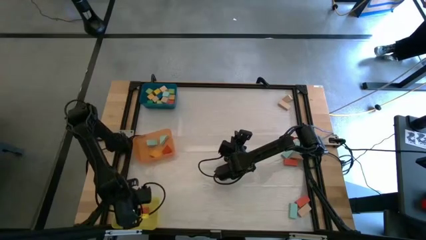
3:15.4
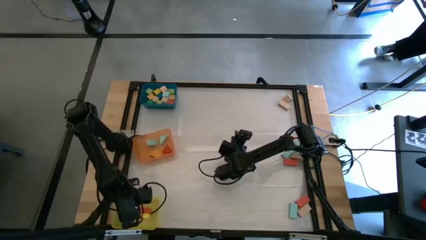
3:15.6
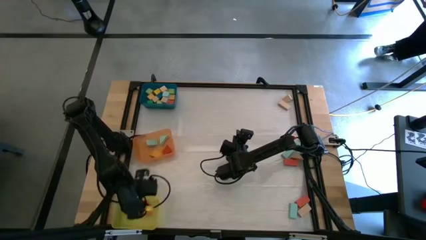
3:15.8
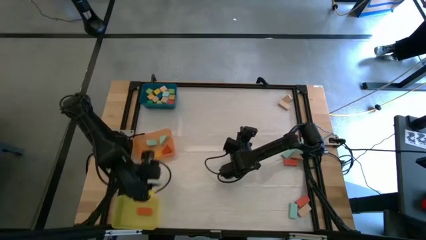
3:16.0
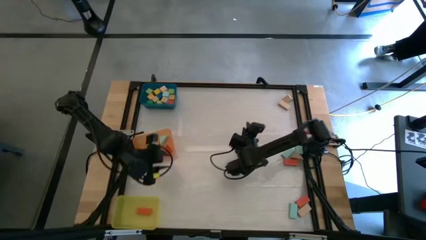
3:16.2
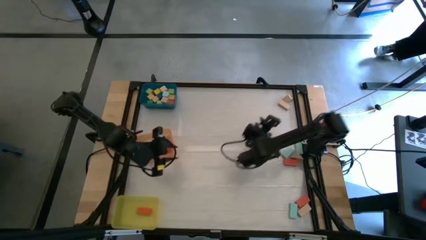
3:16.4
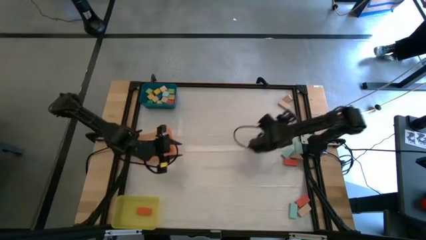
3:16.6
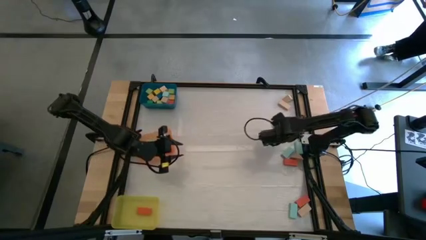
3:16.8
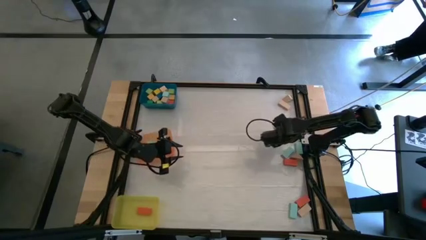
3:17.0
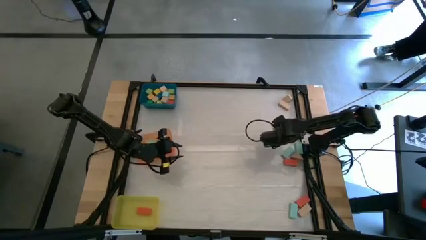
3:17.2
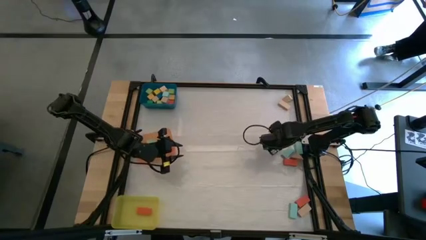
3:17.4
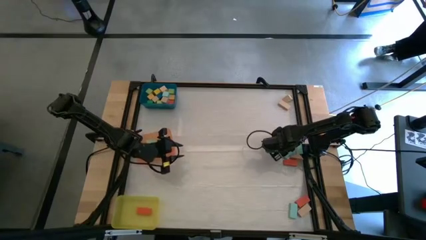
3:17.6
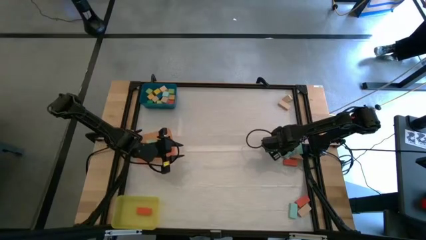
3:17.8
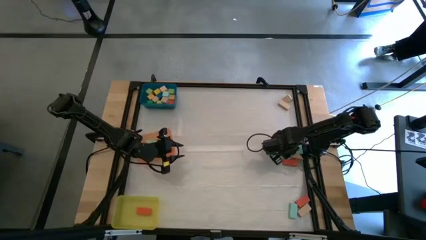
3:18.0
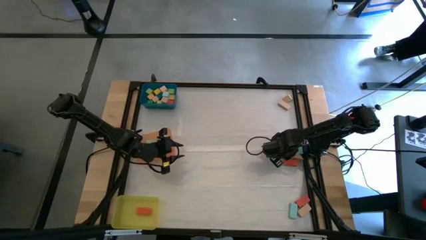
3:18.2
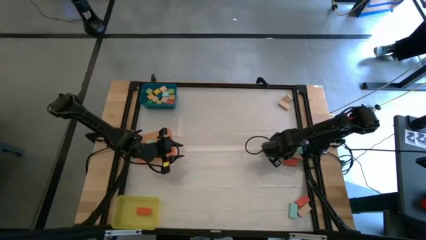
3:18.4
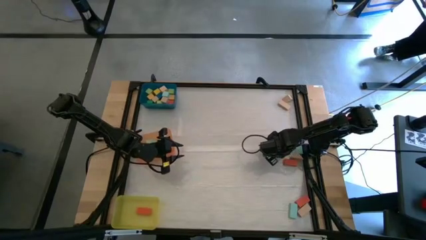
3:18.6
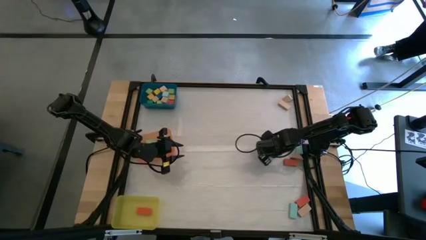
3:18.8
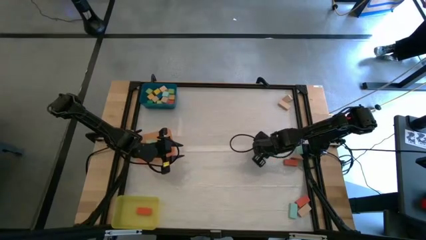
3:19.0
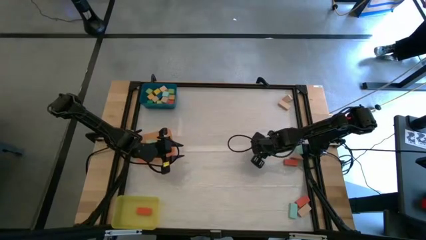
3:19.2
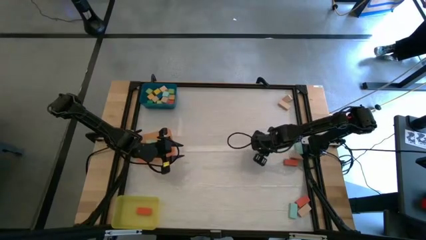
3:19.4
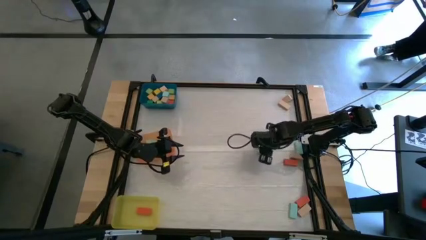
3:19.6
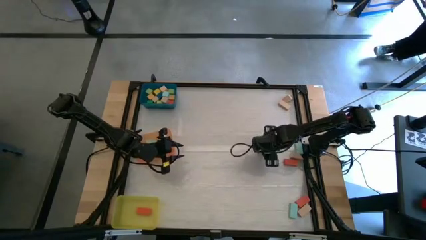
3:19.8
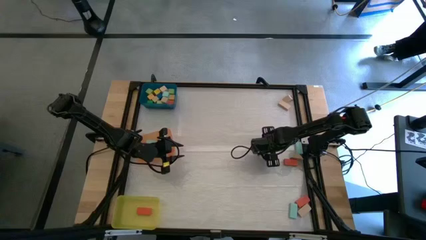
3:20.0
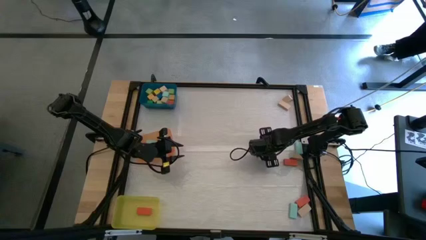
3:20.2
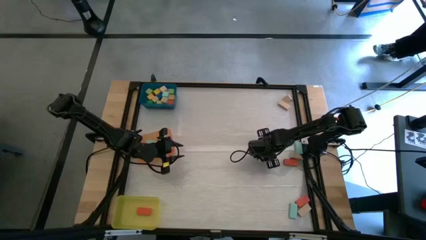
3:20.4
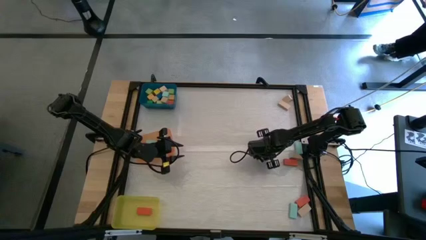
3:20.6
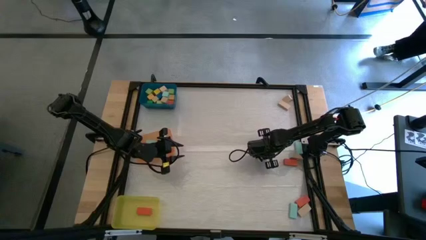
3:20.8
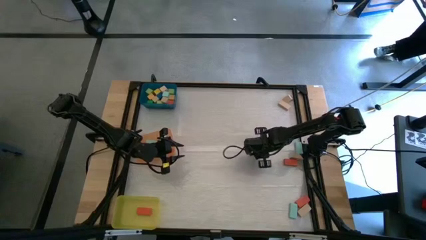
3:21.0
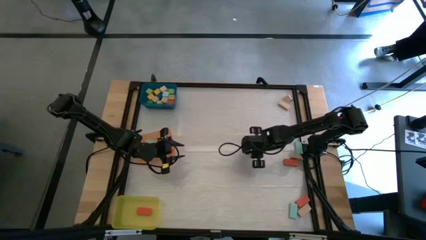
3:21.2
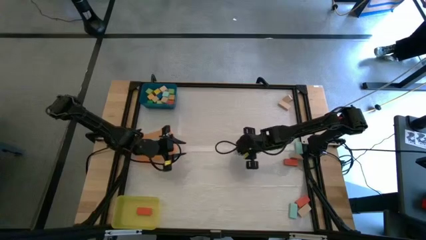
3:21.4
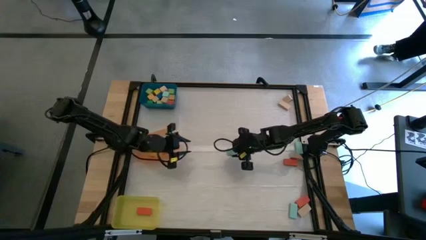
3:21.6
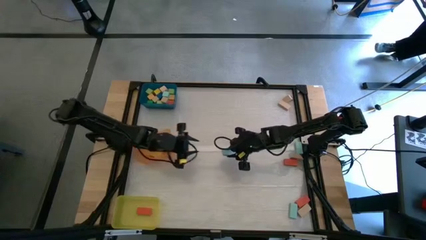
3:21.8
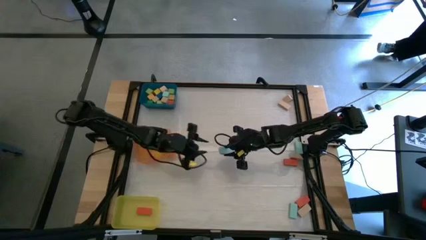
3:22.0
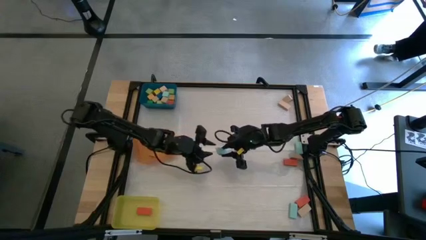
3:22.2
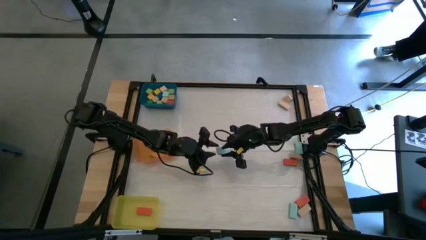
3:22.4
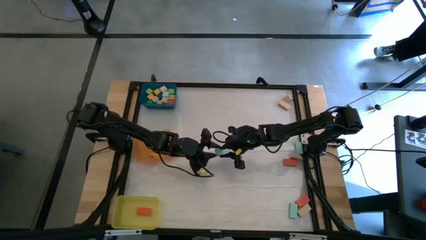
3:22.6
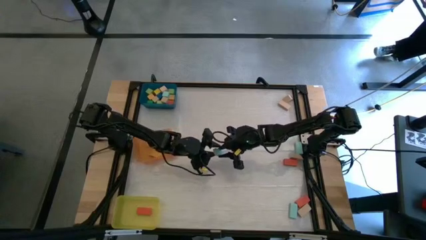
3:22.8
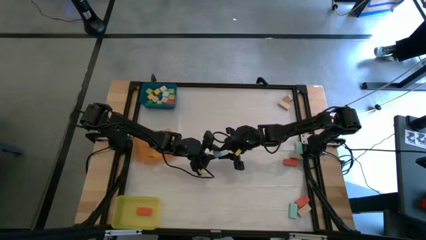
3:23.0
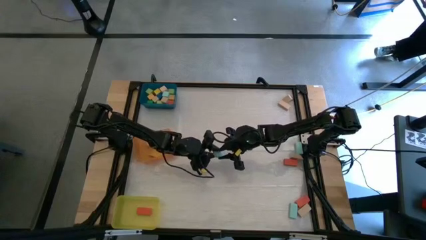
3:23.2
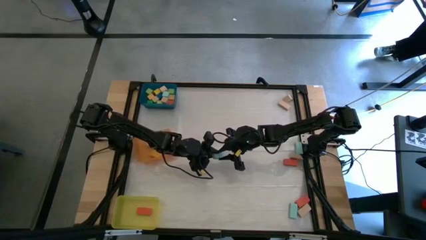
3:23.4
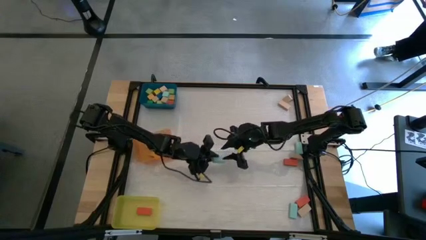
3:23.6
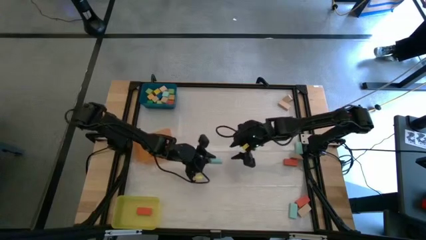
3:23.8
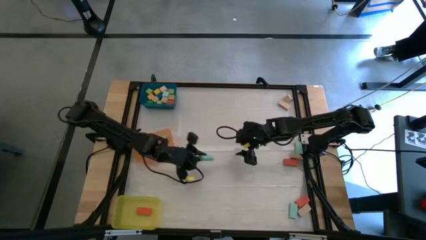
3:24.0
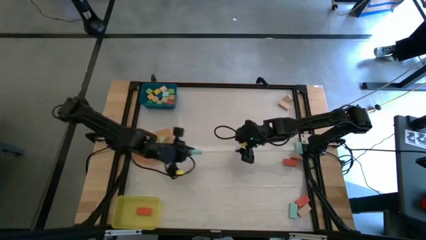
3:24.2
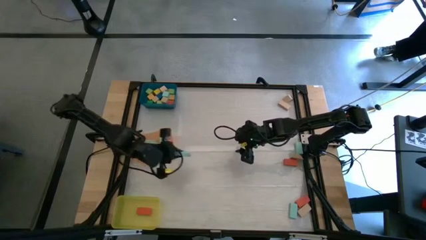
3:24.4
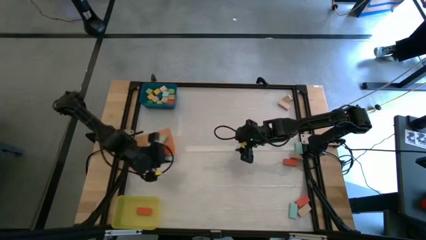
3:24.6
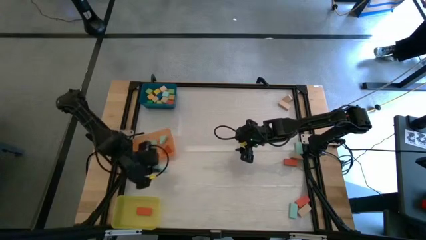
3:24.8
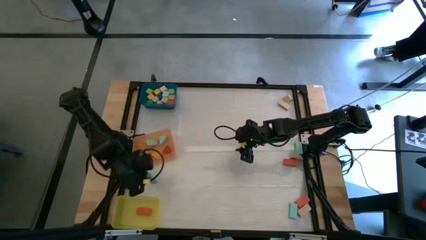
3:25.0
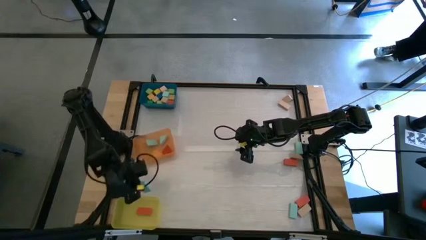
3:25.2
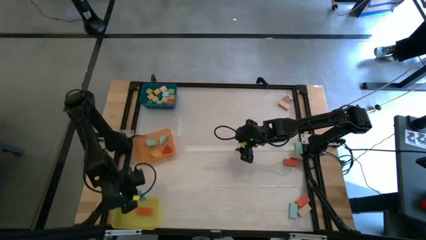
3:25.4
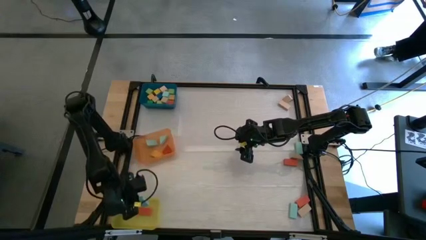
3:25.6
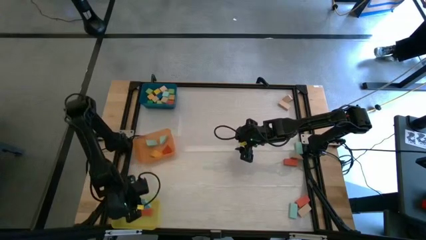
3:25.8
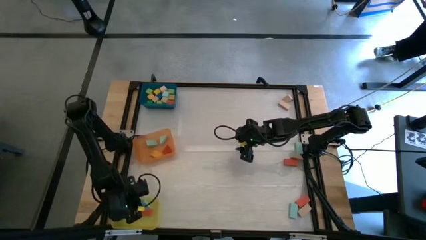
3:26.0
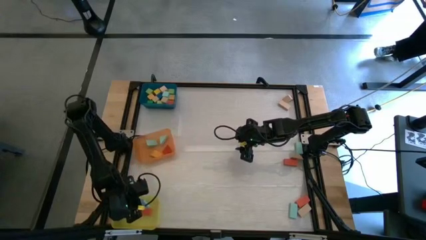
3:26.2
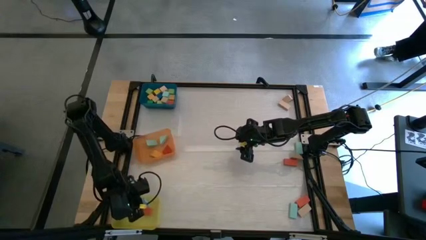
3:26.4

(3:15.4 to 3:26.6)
Task: Sort blocks by size
Put the light blue rectangular block into the yellow bin

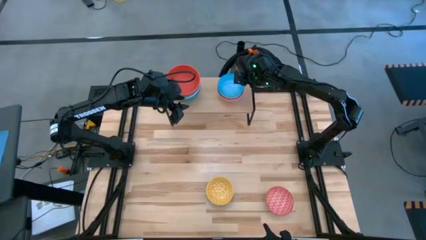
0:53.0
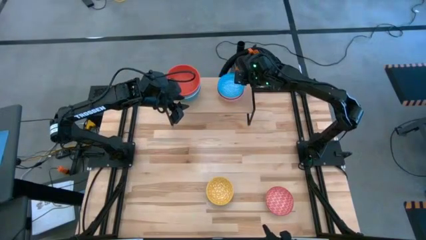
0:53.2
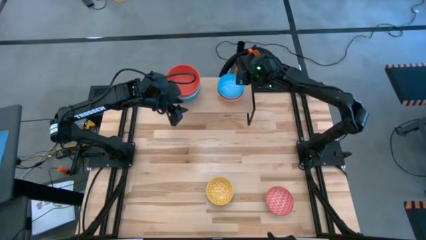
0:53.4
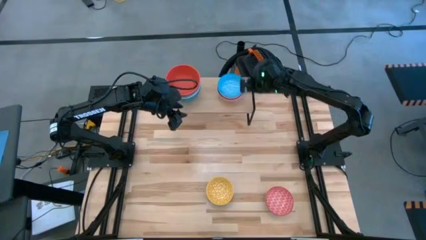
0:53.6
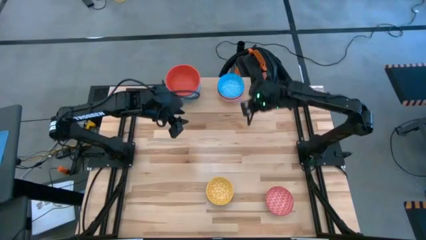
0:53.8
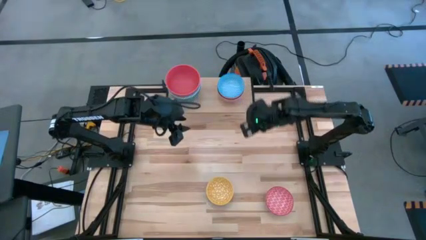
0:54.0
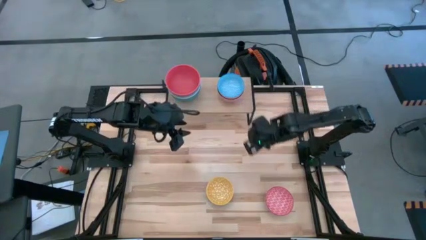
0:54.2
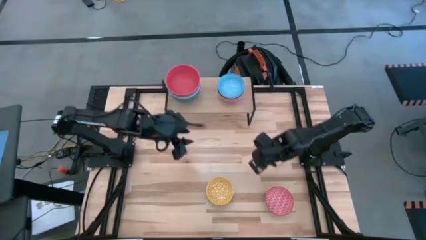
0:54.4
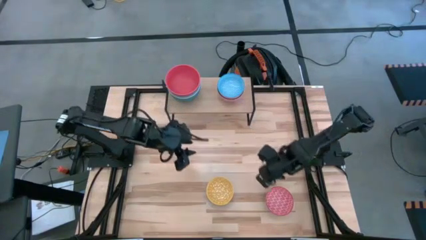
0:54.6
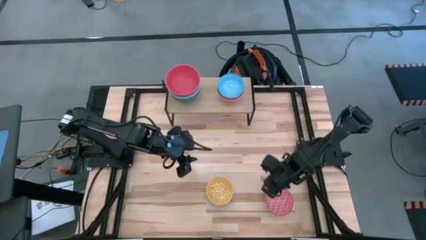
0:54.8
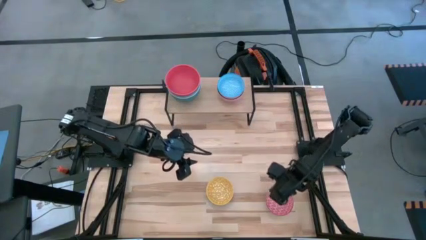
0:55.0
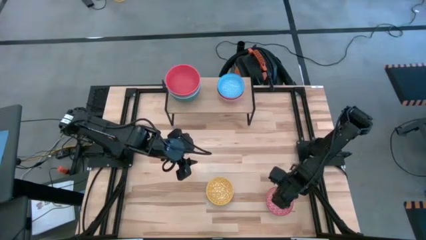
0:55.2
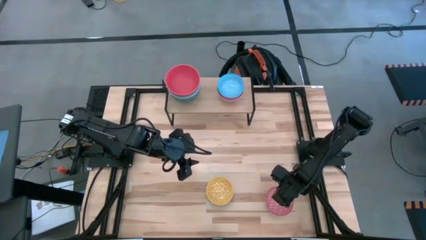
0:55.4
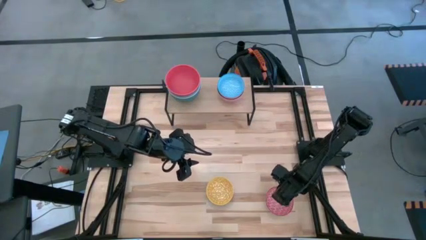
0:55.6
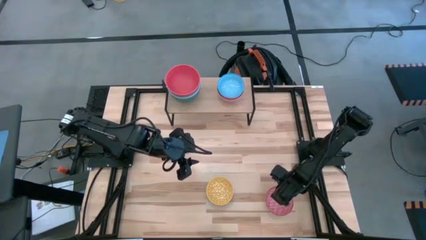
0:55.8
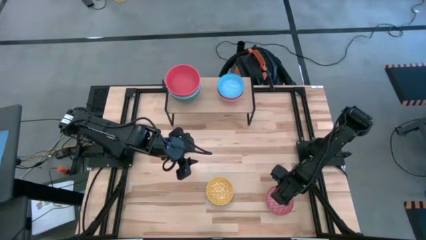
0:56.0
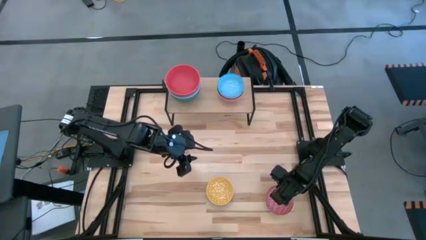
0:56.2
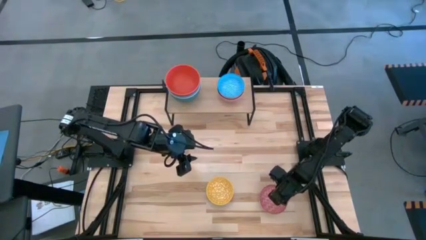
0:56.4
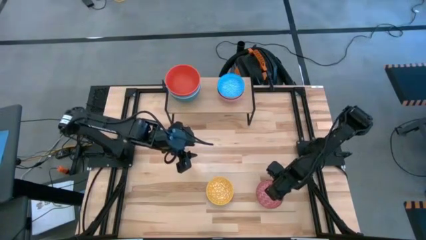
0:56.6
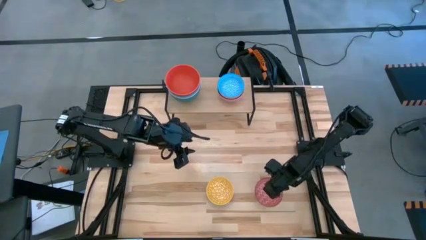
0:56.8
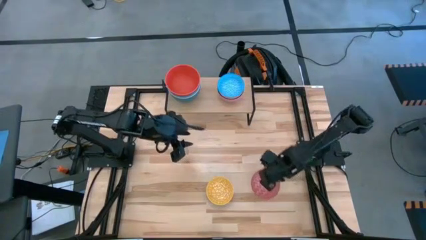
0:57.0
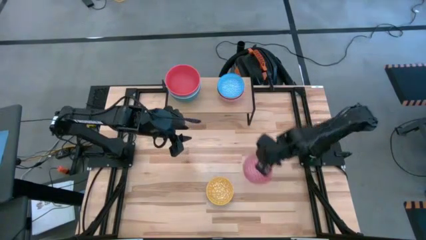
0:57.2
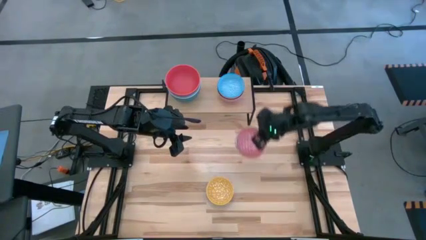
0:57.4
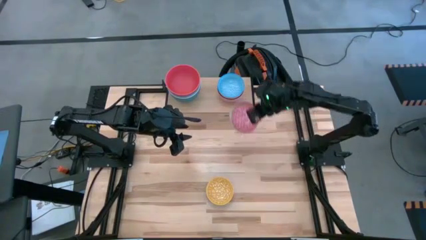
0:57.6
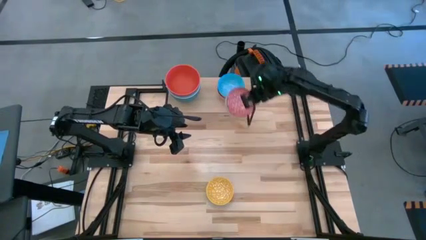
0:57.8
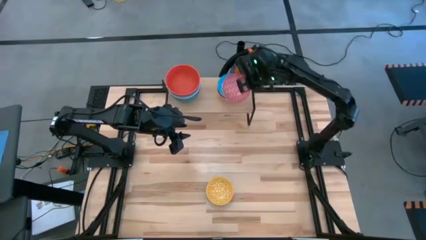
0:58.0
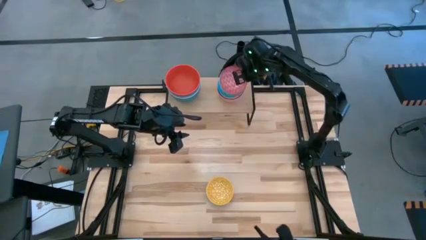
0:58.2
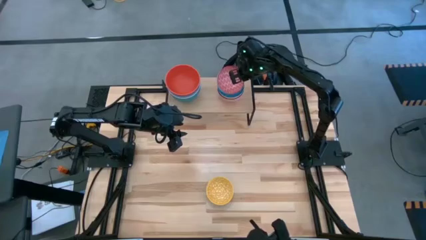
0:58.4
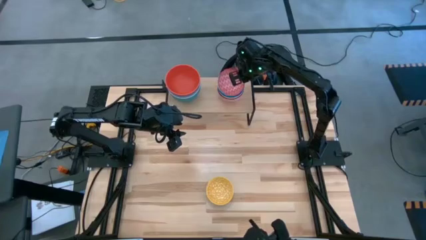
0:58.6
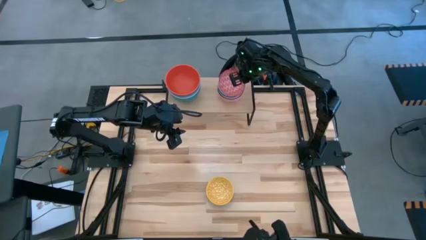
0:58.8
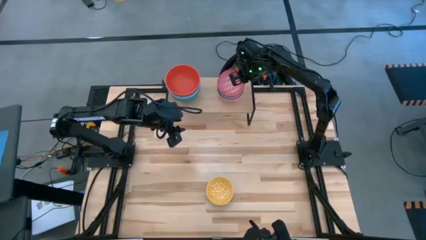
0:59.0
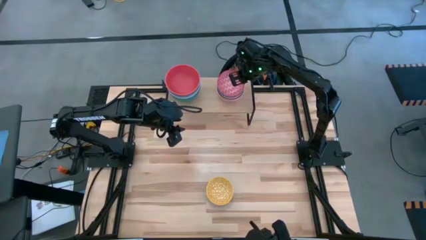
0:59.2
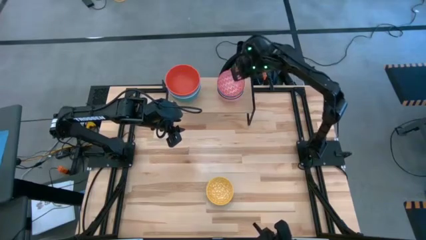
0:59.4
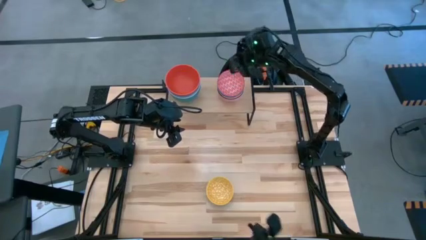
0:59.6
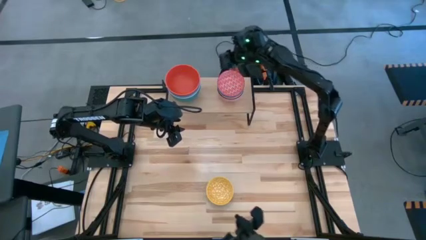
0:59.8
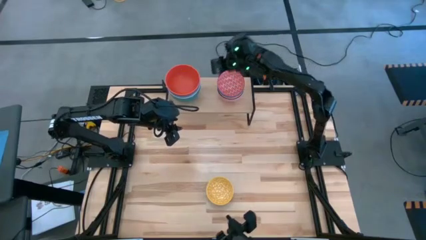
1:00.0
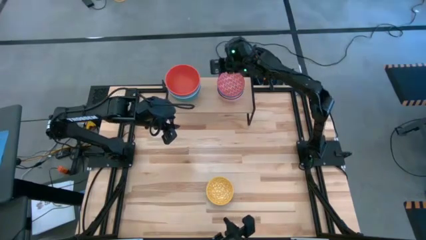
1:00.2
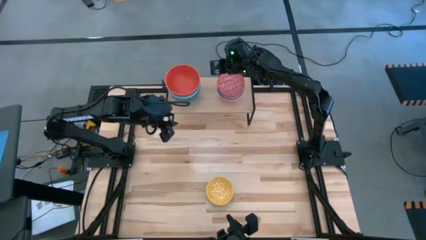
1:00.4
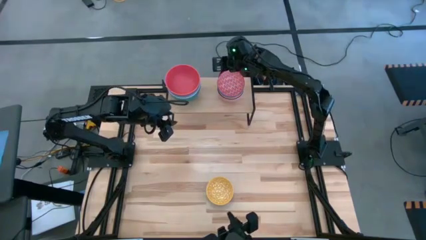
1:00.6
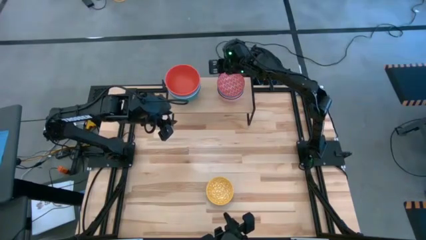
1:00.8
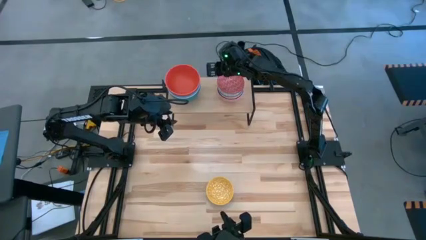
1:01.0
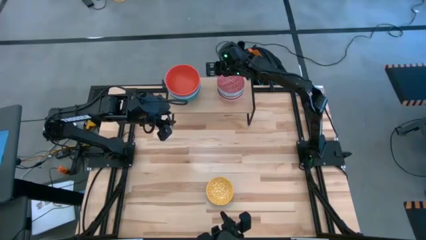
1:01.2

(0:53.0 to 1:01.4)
Task: Place and stack bowls onto a shelf
Stack the red printed bowl into the light blue printed bowl
